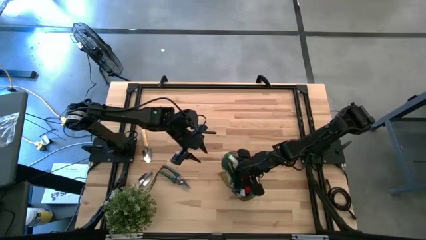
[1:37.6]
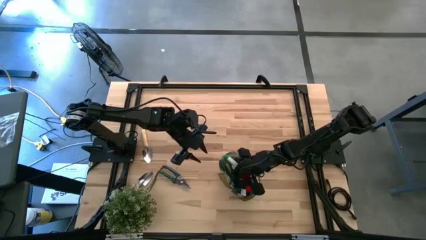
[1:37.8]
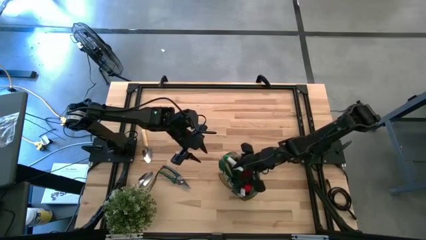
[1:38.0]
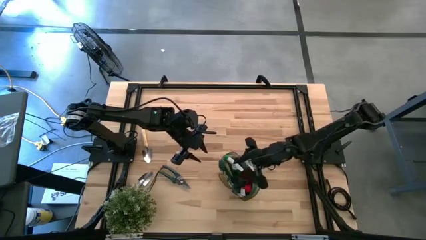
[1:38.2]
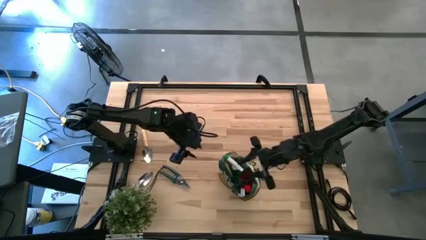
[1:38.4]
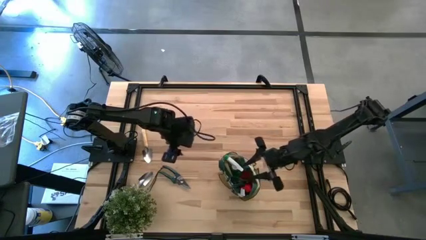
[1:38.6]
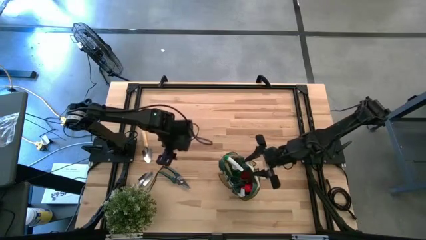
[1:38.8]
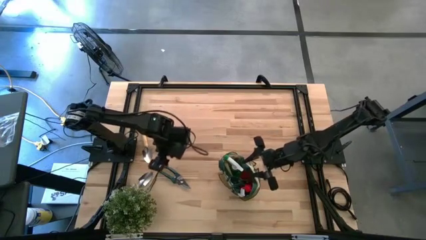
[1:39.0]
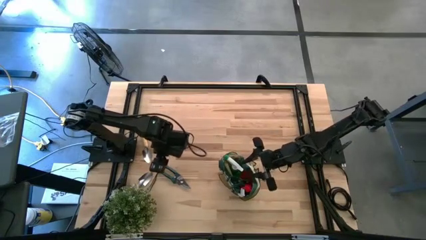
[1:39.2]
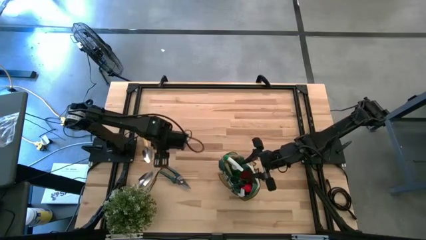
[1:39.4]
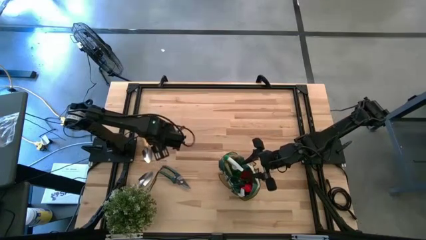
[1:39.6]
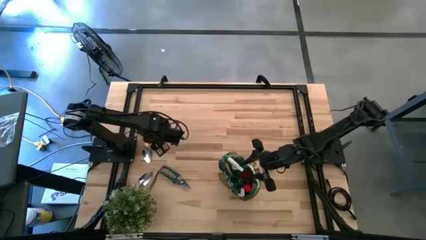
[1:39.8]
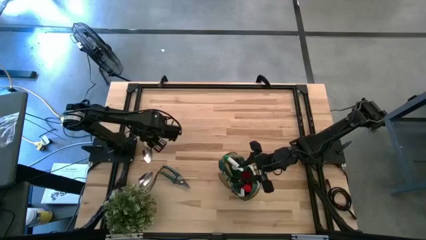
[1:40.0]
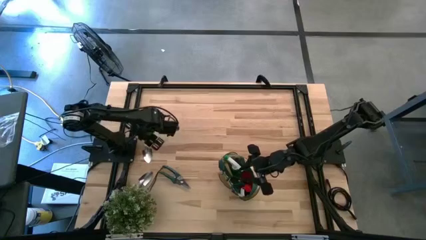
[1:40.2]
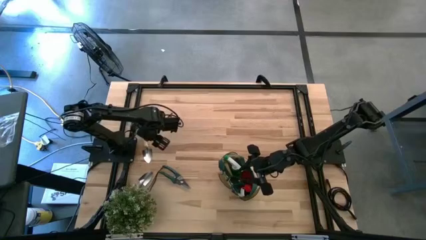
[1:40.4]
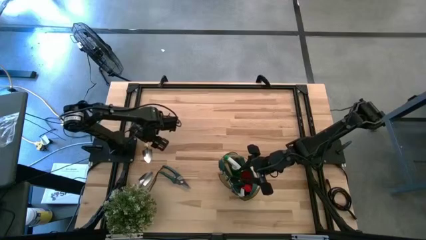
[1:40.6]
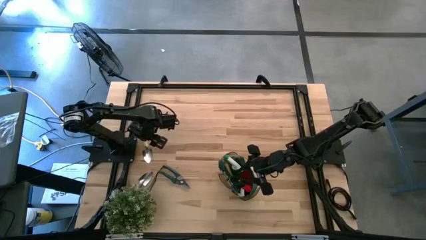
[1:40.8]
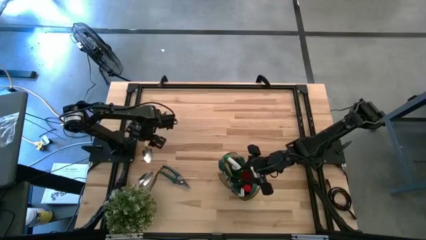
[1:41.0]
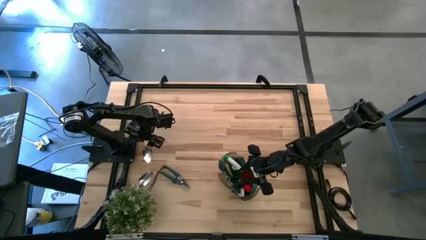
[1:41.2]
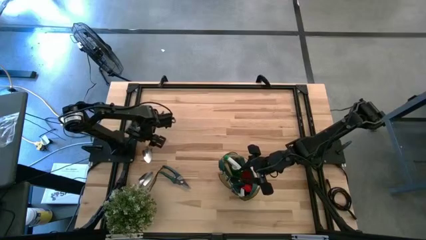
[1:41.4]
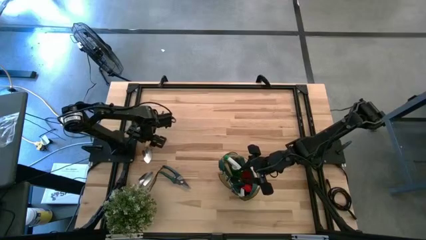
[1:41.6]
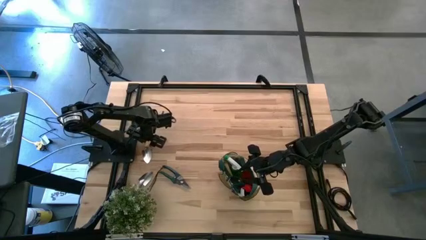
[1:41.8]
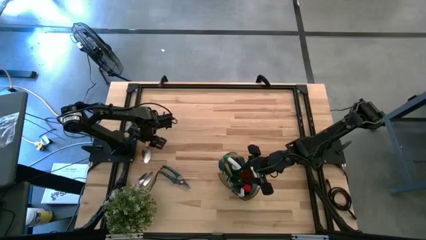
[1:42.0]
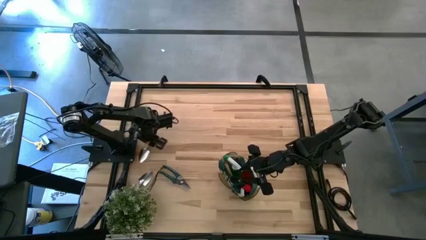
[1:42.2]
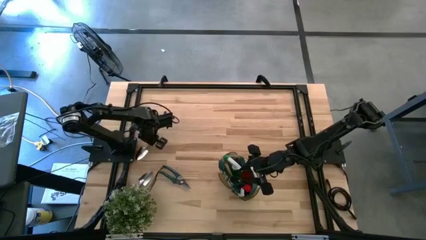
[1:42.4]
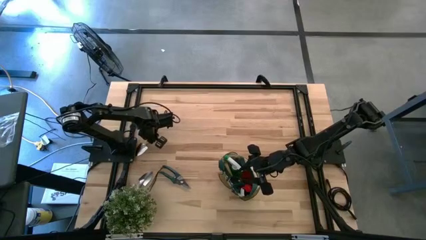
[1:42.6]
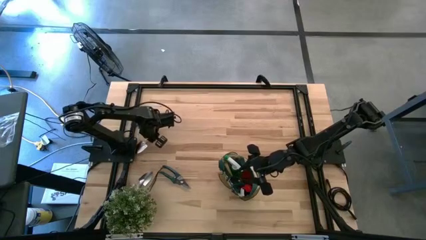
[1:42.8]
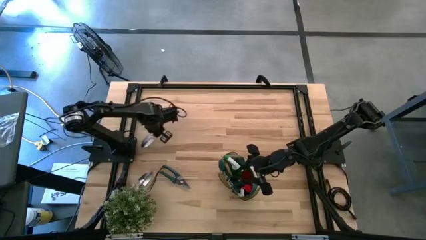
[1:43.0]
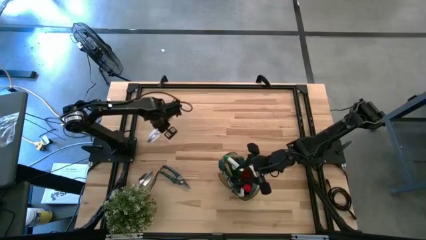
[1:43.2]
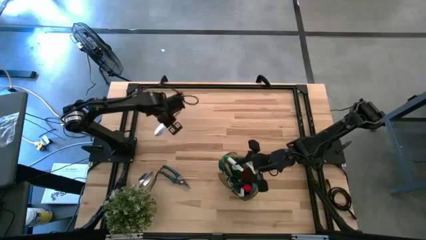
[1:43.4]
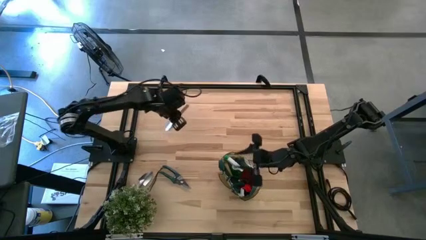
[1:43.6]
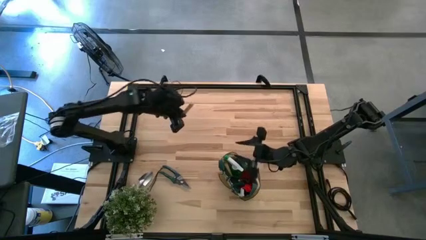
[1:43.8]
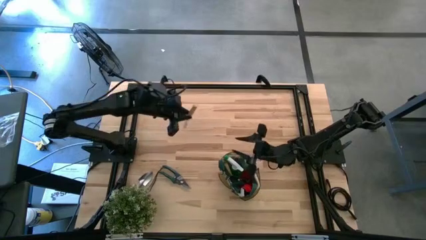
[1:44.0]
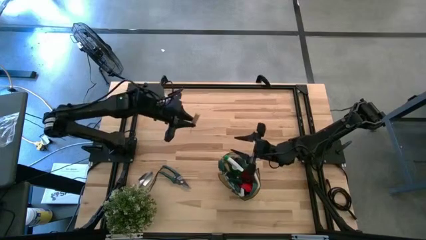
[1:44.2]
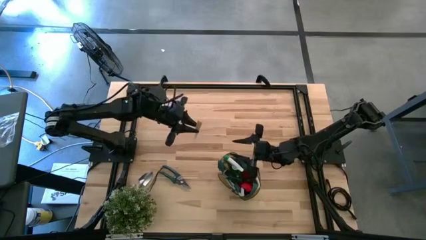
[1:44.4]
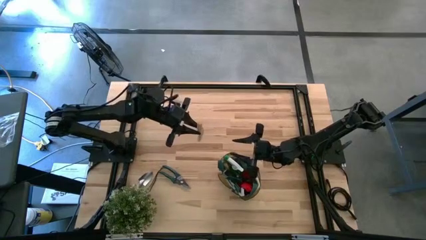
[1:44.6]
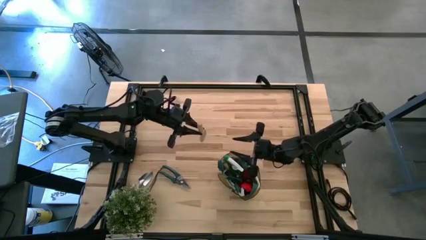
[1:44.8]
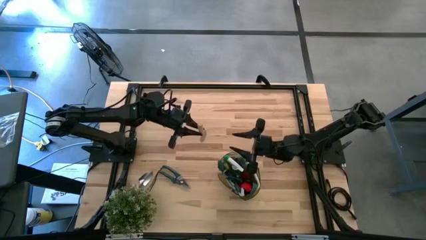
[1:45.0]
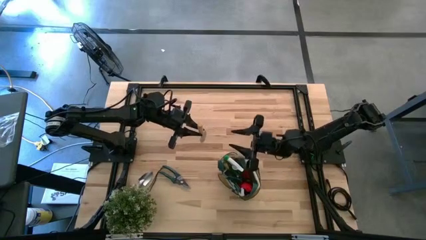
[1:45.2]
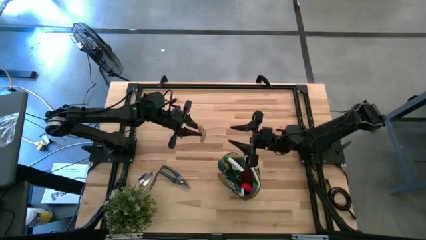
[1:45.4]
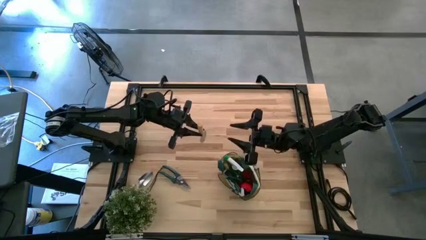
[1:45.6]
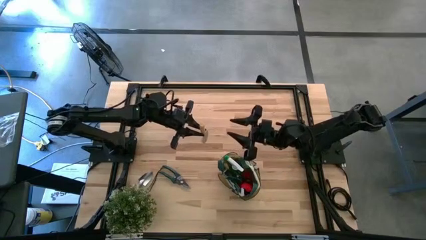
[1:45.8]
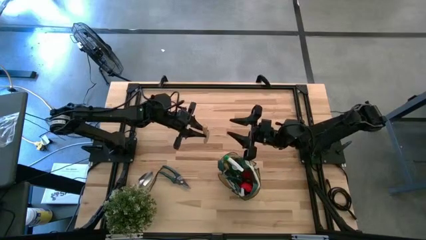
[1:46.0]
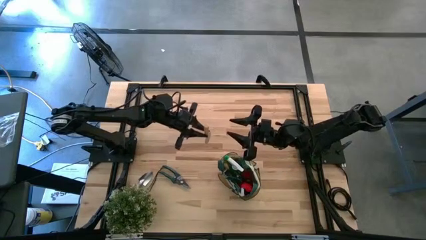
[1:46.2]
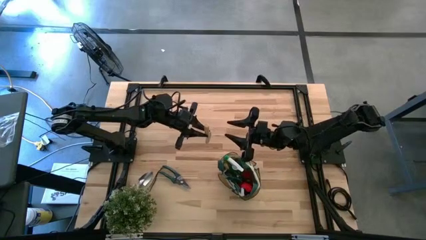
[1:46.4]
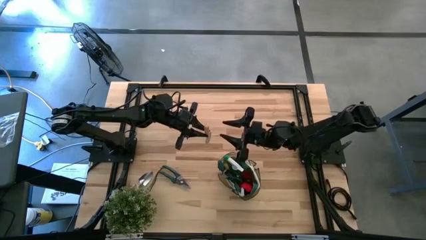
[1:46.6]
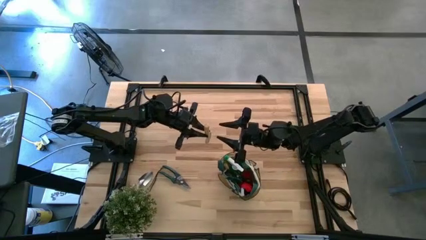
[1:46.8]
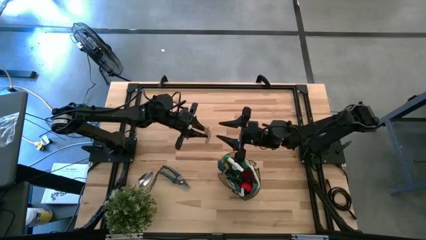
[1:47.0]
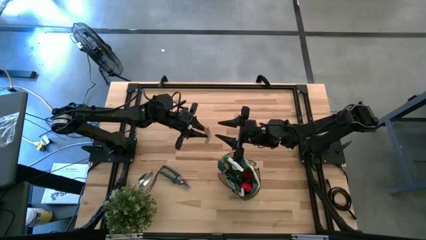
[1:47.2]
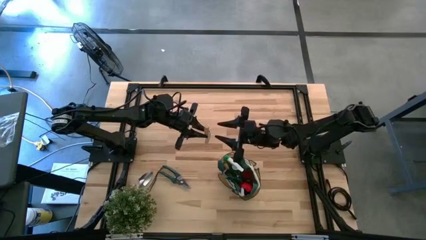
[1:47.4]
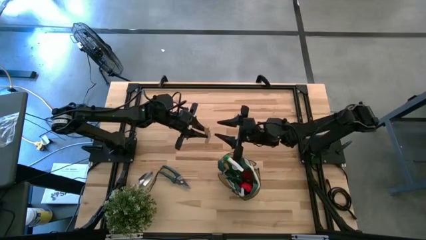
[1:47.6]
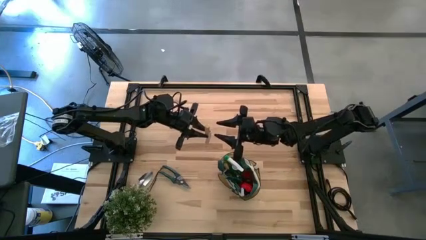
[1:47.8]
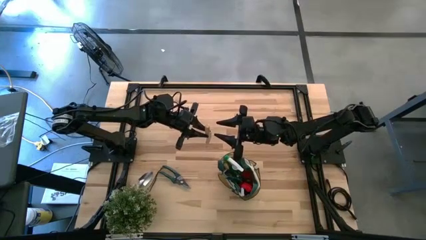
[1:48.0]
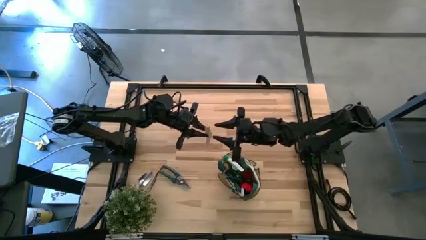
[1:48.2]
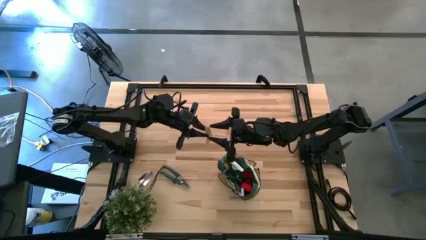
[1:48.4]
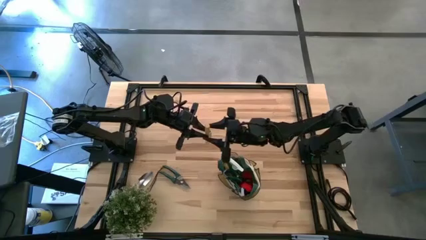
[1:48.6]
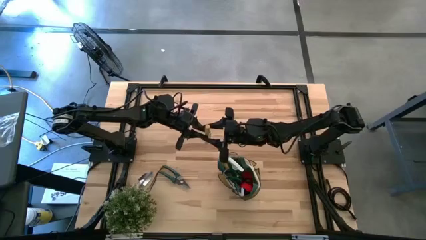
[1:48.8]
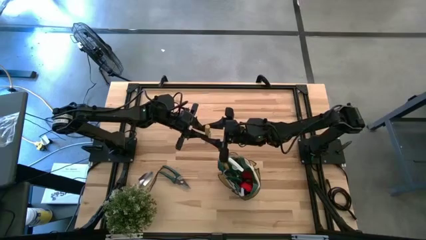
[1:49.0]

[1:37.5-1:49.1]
Task: Pick & Place Garden tools in Gardening bag
Put the top brown trowel into the green gardening bag

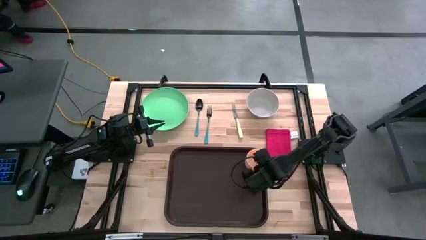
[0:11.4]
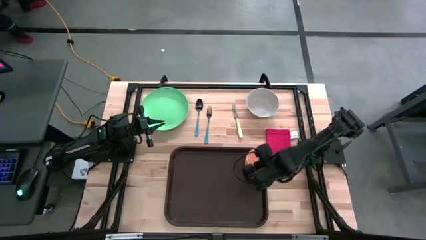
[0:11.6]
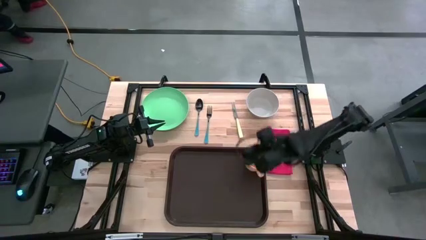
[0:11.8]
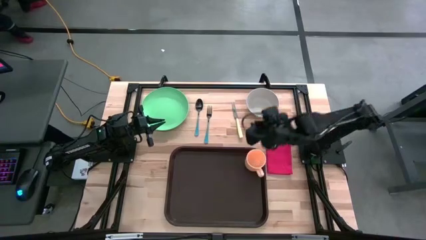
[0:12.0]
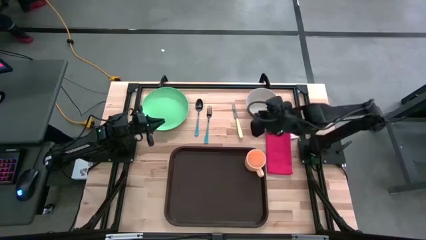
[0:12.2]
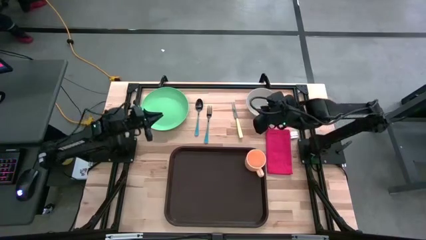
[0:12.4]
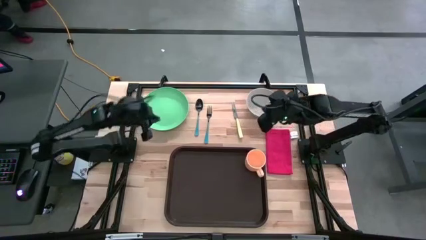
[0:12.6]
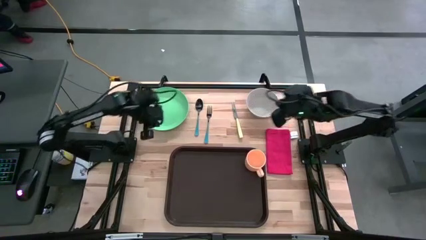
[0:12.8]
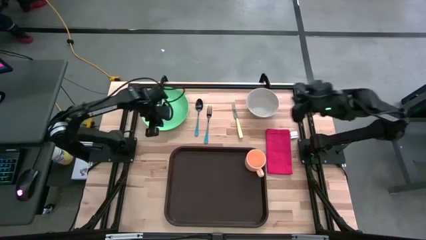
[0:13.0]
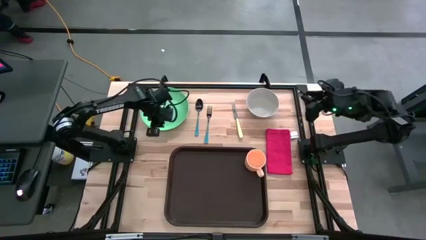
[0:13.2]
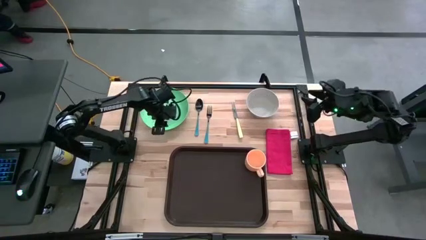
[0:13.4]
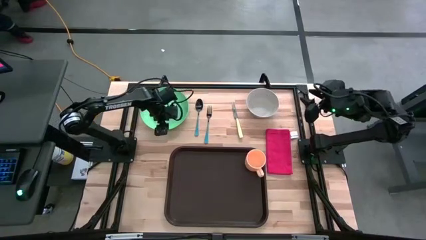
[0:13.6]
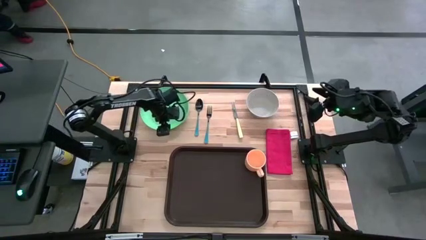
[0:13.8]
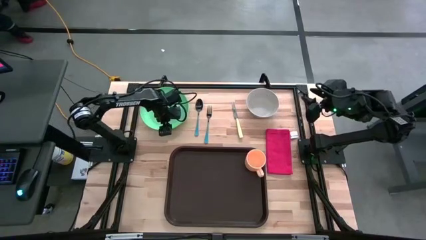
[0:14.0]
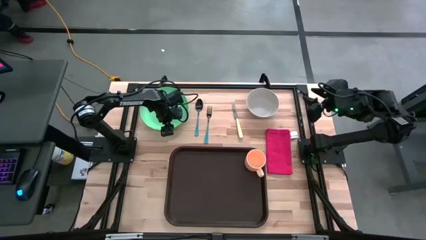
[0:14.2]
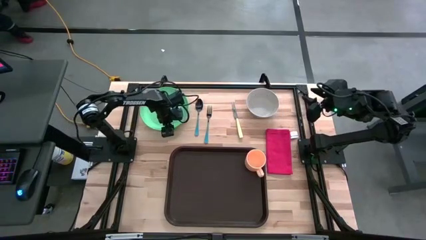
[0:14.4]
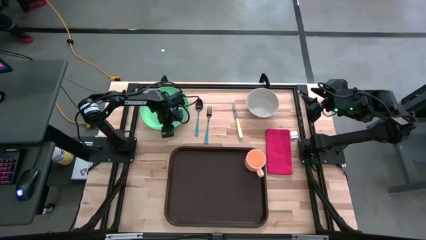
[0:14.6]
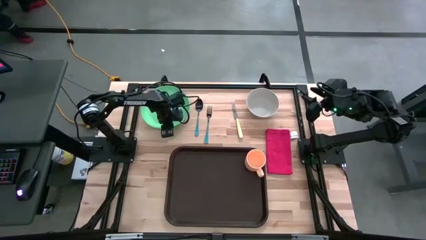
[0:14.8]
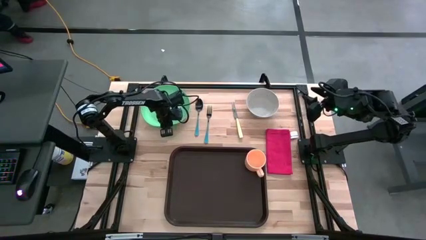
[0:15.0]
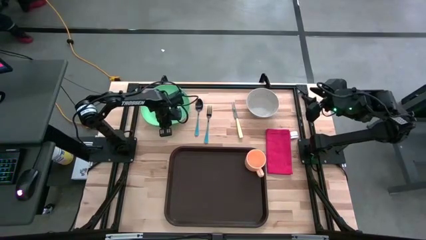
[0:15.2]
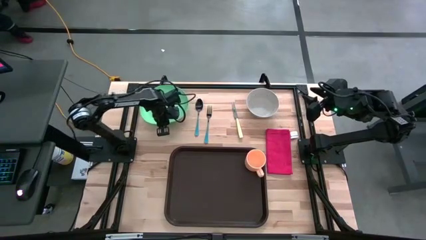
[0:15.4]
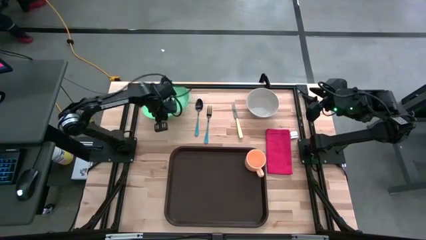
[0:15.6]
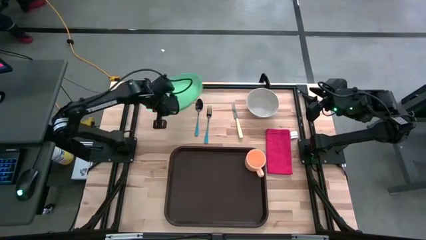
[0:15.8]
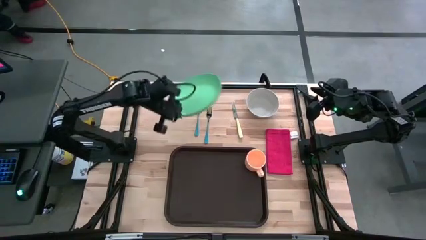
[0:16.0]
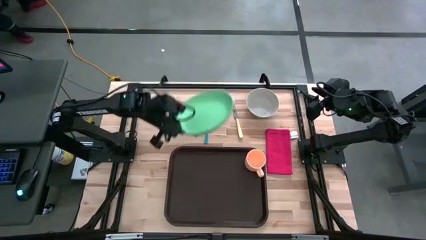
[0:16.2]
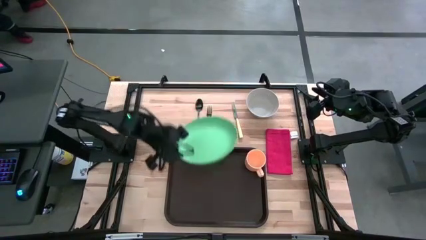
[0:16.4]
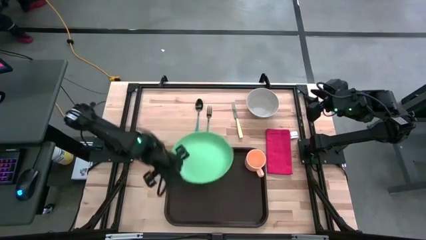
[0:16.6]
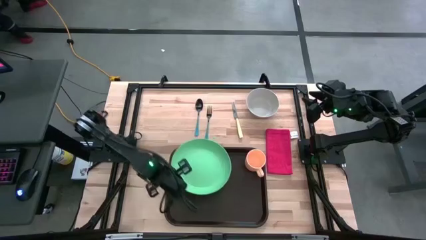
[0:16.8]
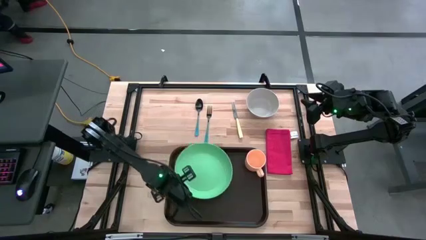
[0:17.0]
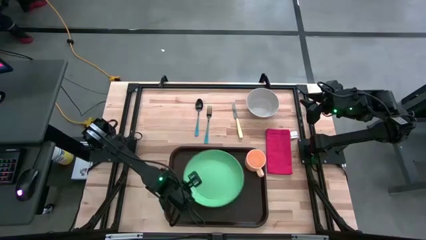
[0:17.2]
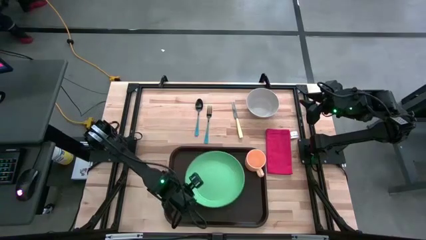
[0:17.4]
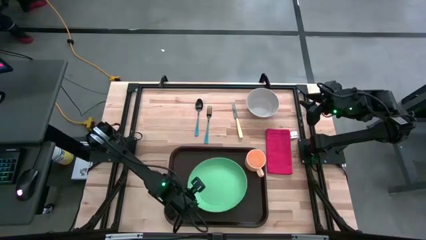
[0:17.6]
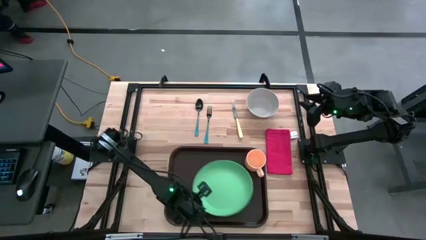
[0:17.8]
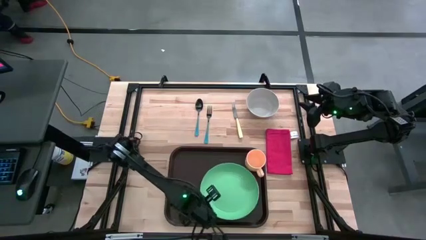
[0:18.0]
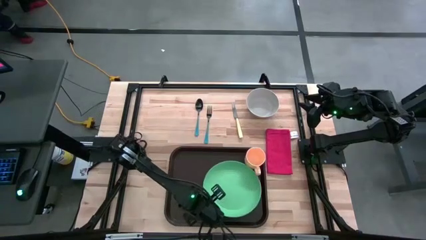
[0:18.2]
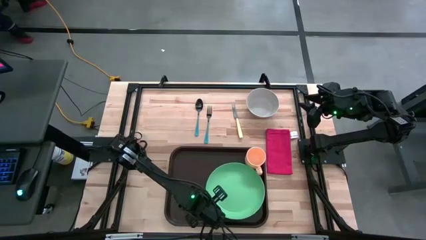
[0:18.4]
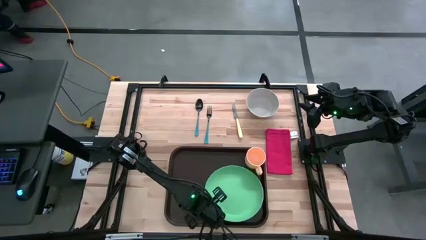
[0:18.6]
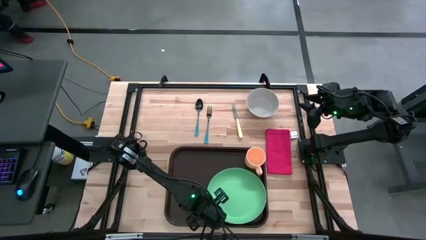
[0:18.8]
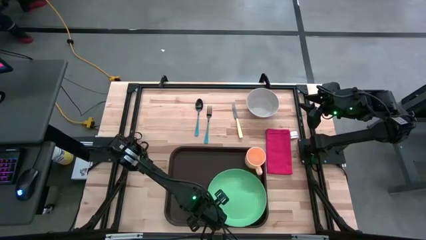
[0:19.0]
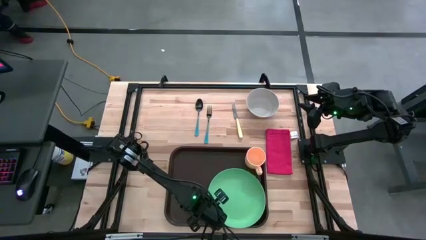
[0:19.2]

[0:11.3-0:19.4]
Task: Set up tray
Put the green plate on the brown tray below the orange mug
